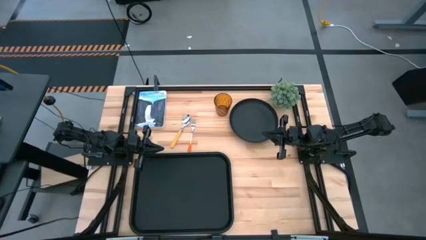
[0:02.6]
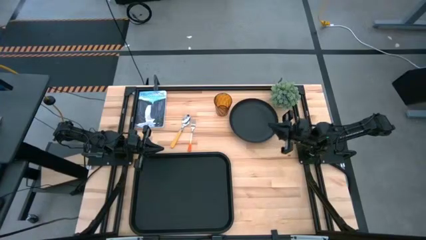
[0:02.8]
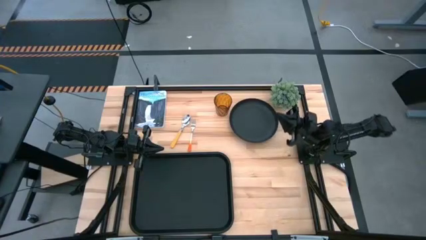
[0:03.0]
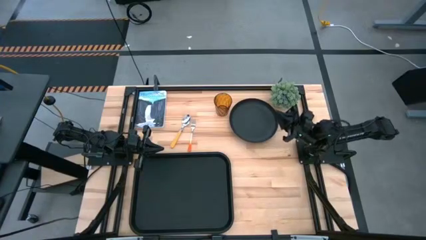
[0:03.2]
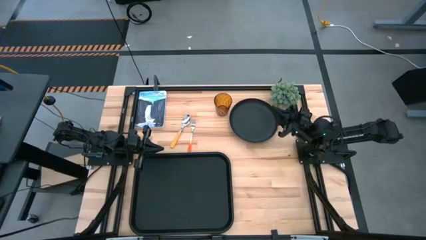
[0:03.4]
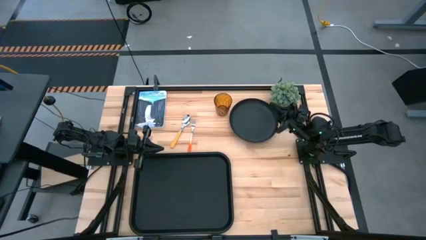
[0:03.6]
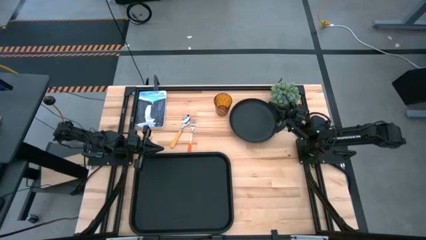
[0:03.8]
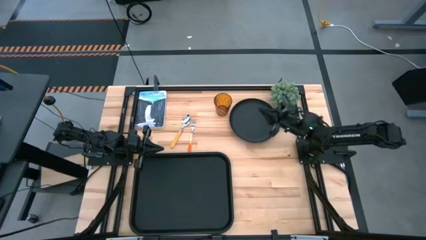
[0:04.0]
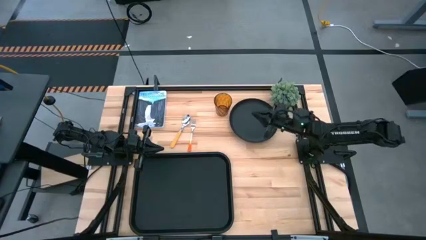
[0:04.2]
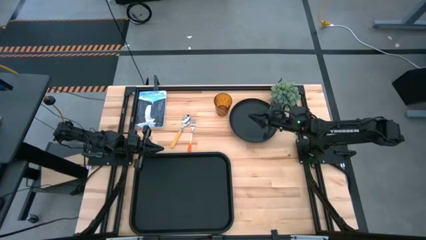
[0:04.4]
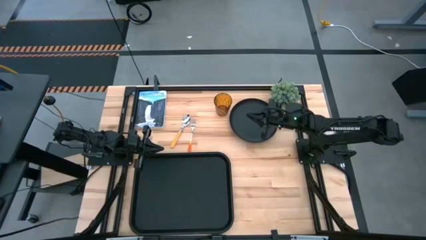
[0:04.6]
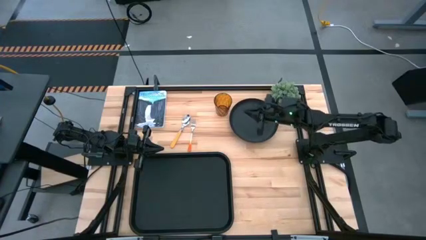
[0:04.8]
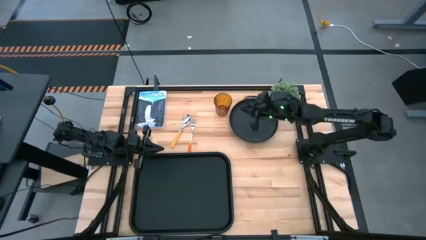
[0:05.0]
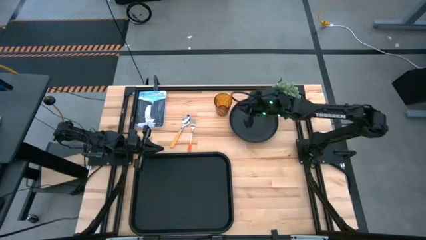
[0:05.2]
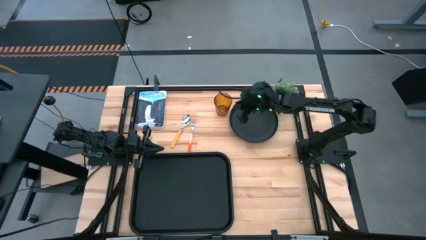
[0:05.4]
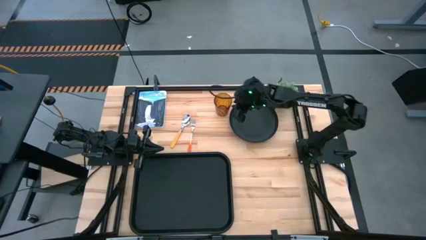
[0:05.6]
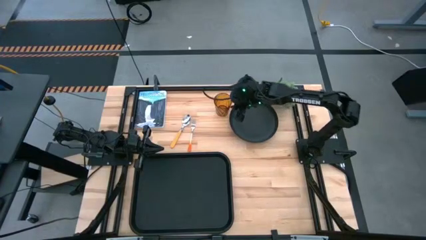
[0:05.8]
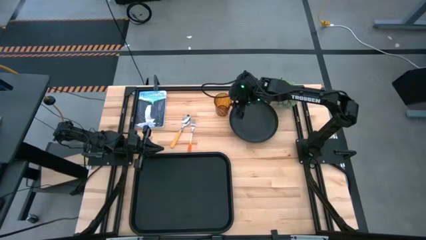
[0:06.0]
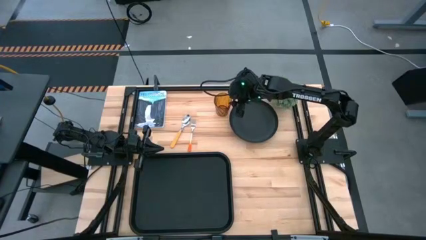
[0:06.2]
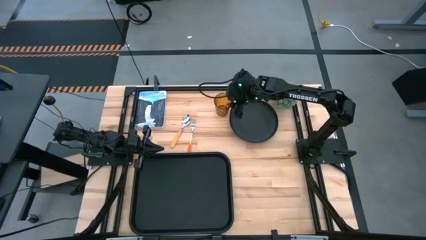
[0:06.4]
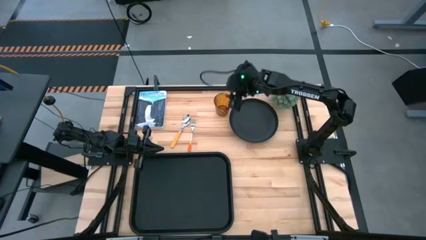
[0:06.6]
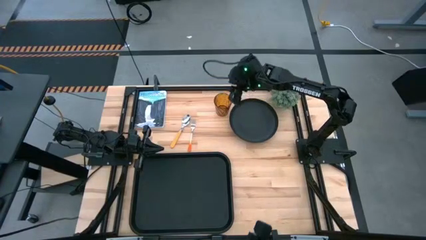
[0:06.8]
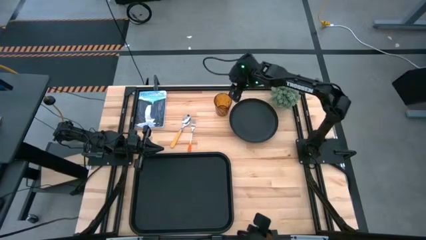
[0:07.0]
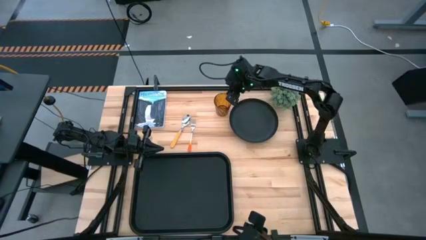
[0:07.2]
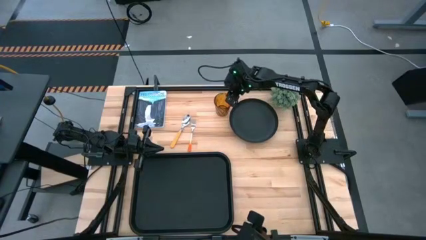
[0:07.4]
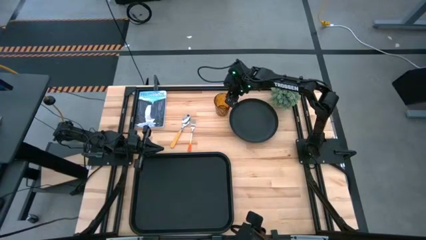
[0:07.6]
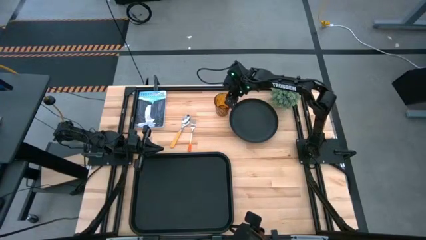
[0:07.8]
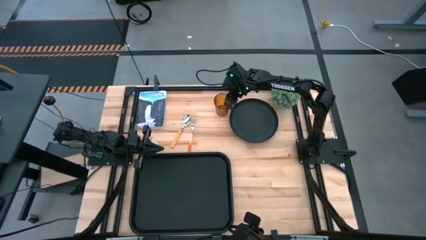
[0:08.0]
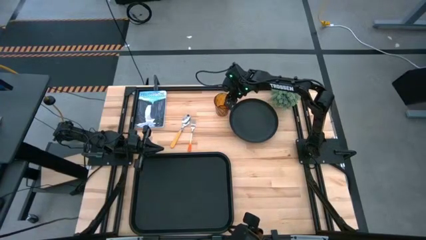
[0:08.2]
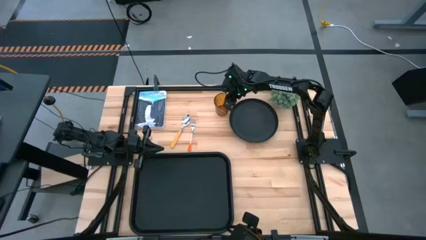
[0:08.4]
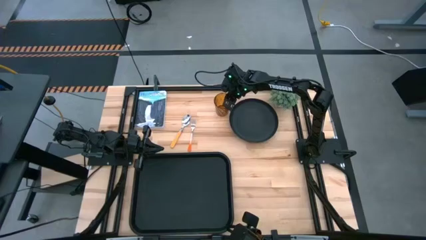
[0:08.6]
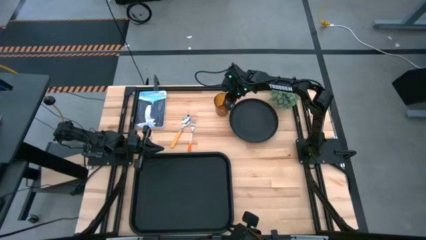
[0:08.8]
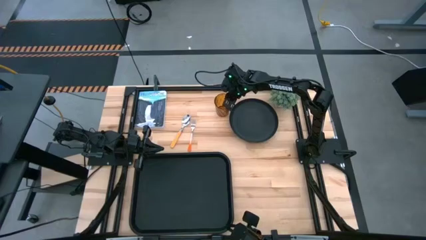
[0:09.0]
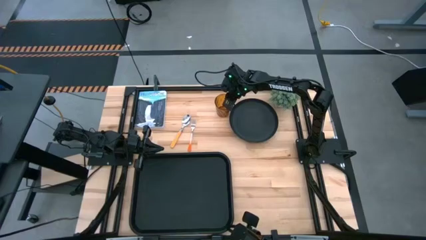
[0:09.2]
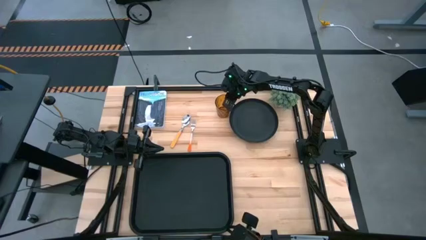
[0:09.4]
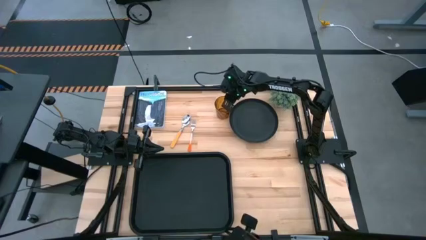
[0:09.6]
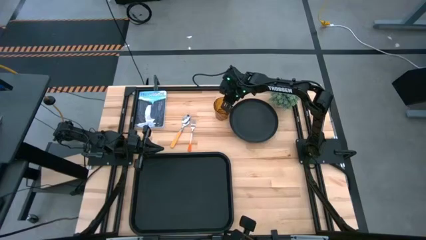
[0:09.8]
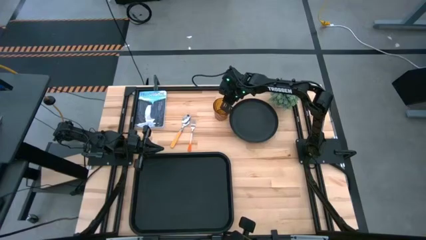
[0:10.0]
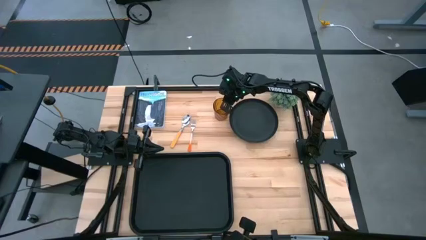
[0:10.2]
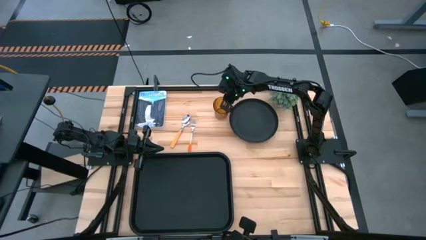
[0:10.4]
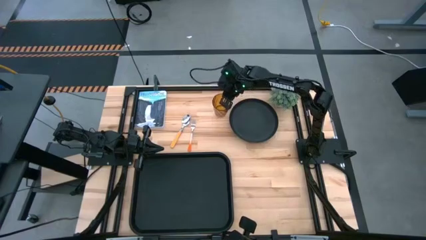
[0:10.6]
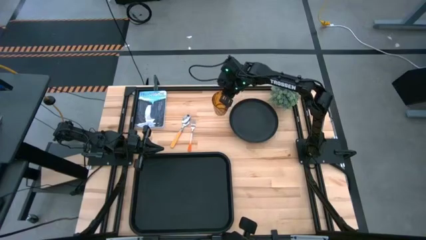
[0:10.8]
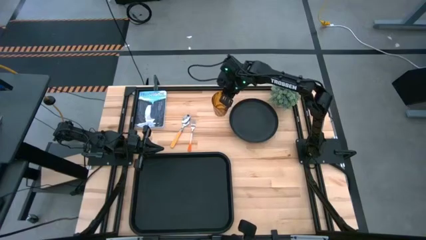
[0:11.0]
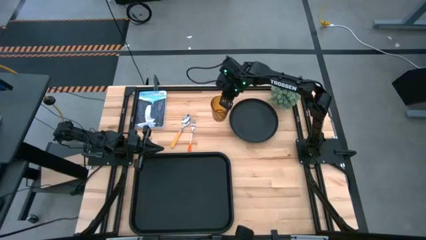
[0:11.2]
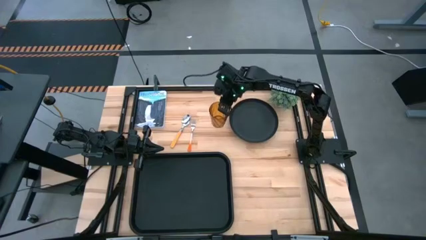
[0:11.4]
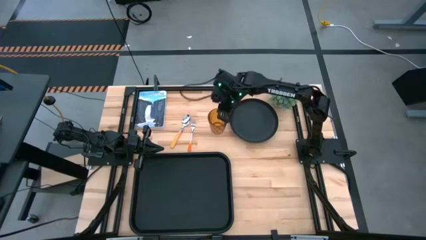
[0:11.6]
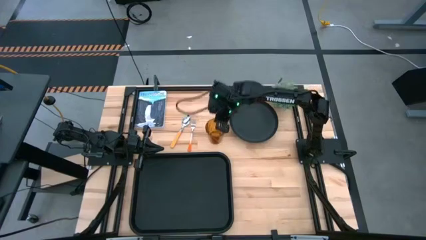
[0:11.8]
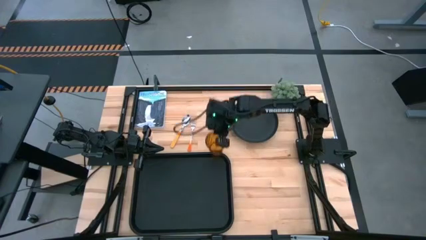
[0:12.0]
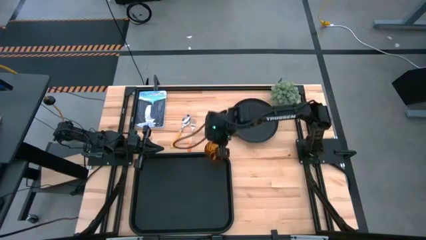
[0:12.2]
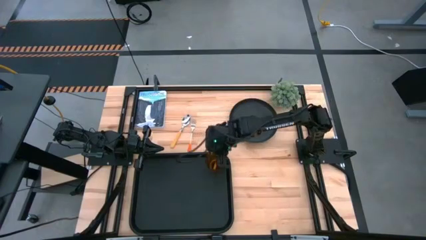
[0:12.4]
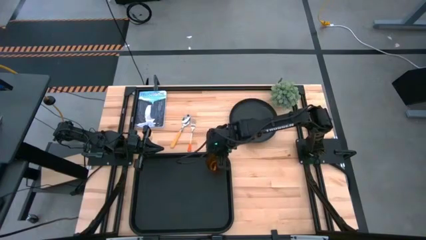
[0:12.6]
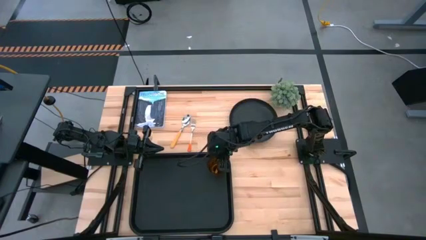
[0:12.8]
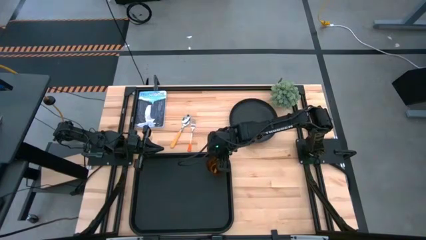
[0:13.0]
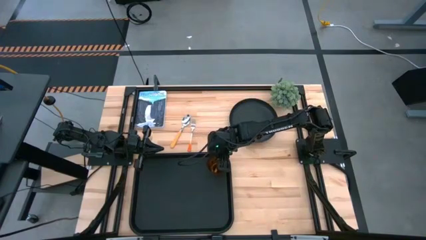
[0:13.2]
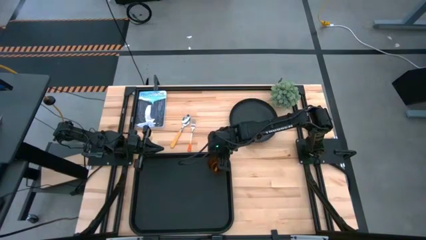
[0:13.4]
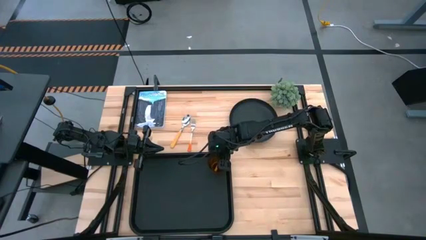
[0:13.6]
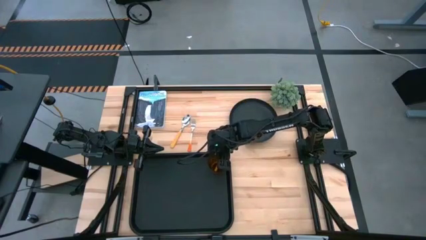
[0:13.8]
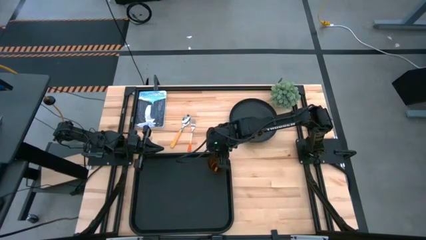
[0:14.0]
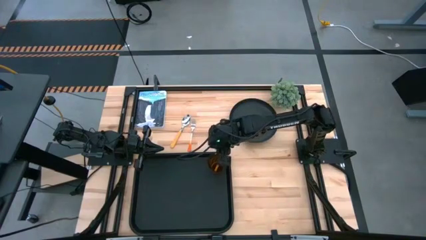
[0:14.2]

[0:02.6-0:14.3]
Task: Pick and place plate/cup/fork/spoon on tray
Put the orange glass on the black serving tray
